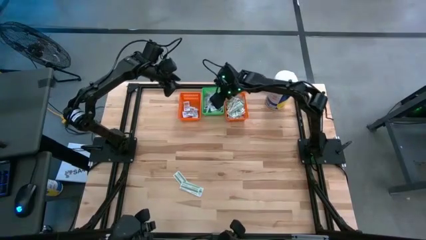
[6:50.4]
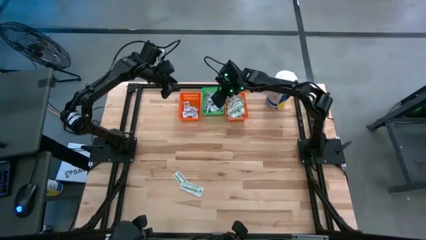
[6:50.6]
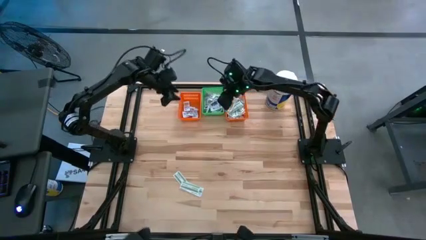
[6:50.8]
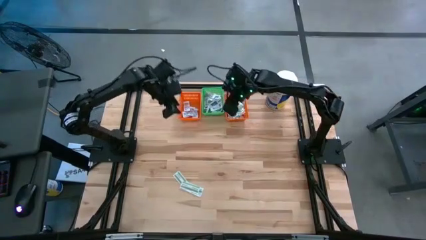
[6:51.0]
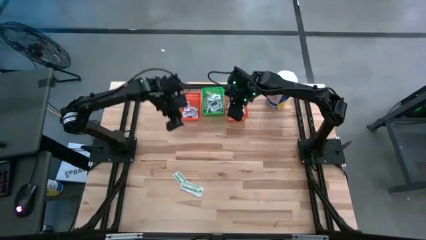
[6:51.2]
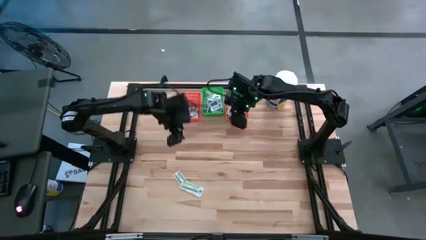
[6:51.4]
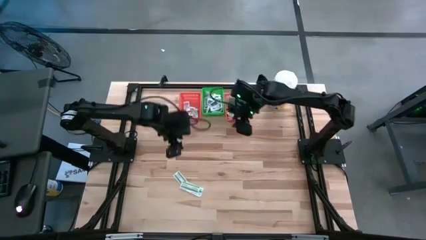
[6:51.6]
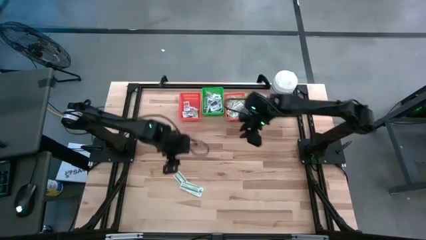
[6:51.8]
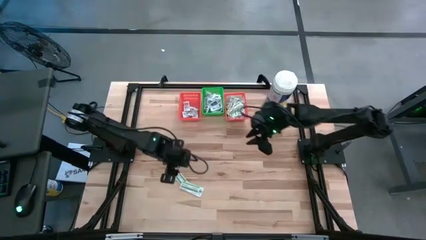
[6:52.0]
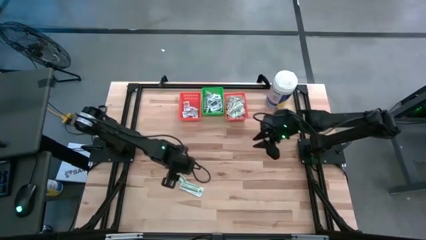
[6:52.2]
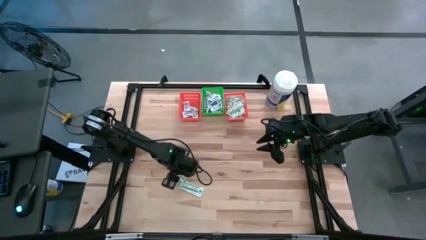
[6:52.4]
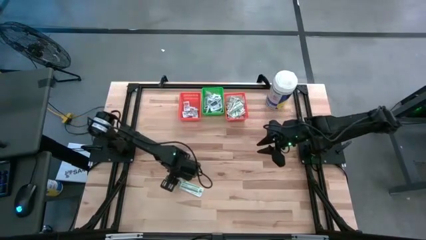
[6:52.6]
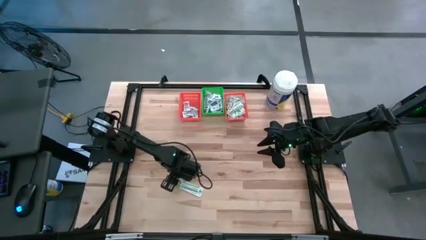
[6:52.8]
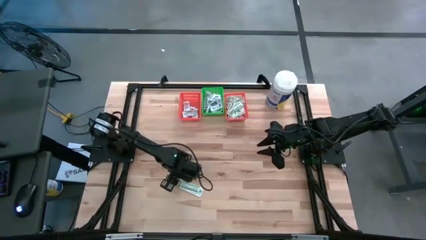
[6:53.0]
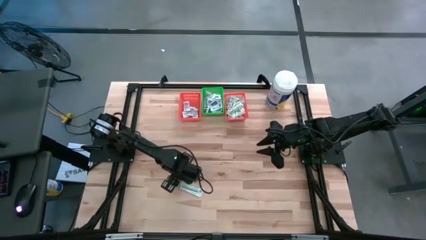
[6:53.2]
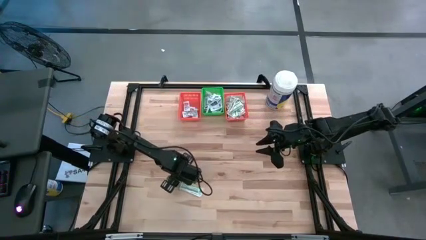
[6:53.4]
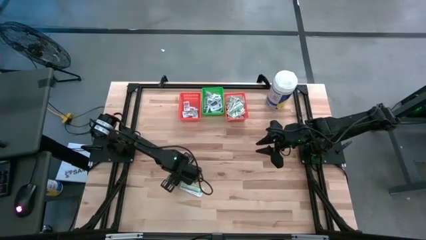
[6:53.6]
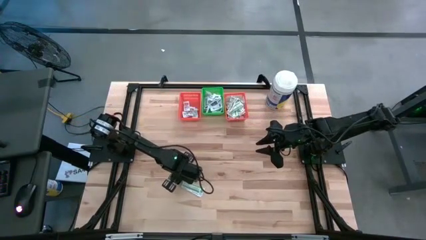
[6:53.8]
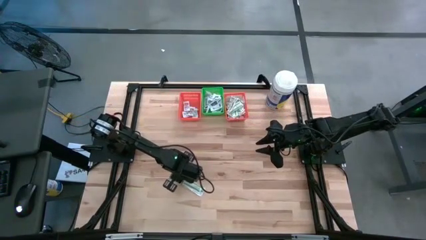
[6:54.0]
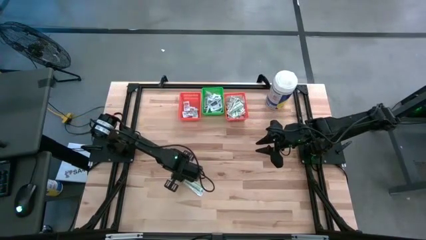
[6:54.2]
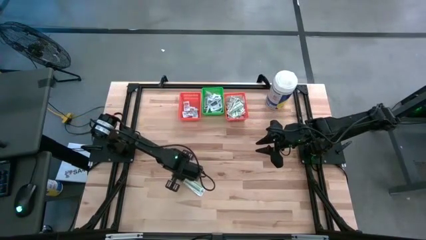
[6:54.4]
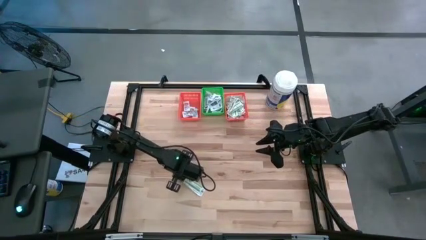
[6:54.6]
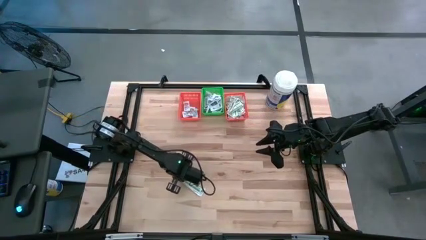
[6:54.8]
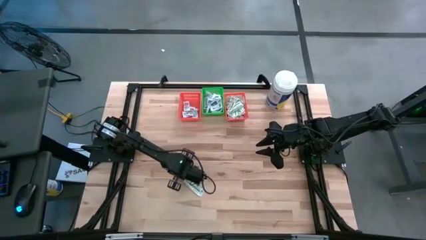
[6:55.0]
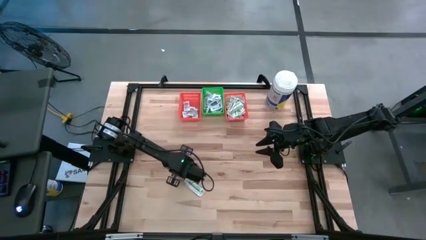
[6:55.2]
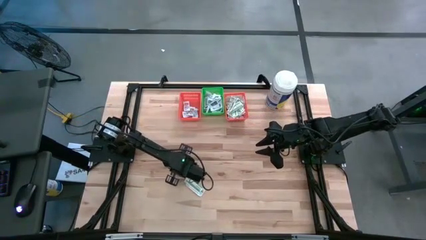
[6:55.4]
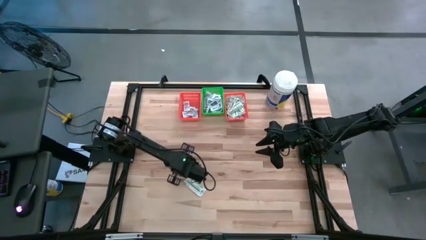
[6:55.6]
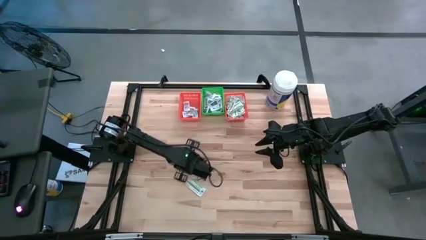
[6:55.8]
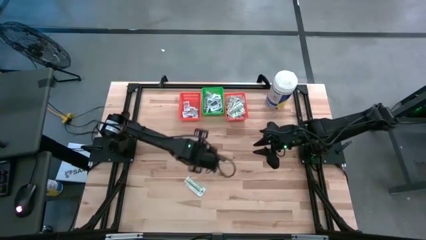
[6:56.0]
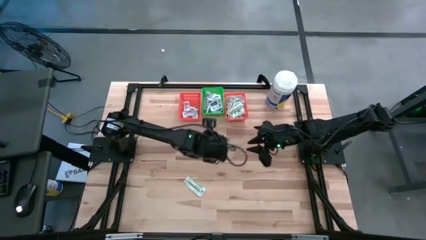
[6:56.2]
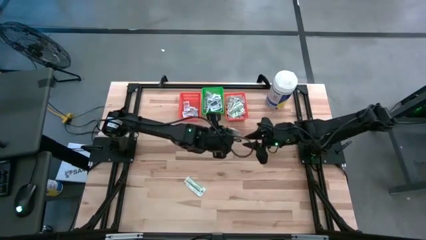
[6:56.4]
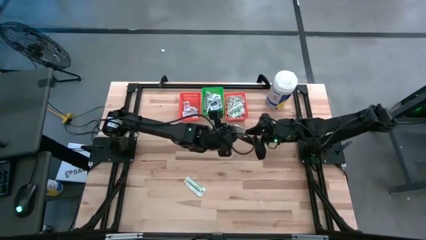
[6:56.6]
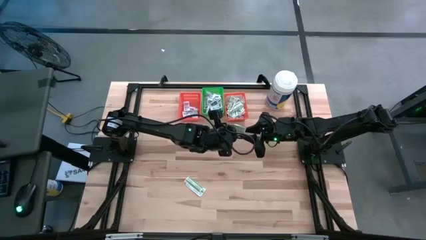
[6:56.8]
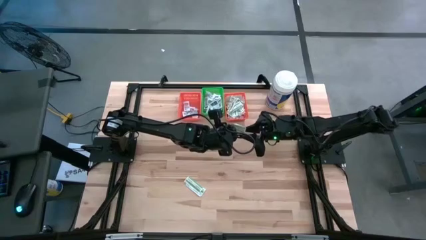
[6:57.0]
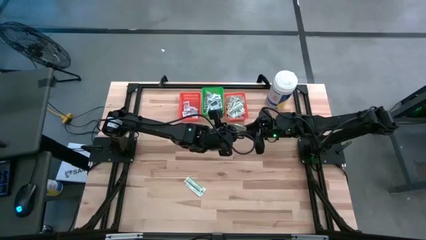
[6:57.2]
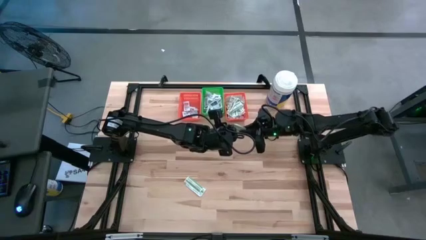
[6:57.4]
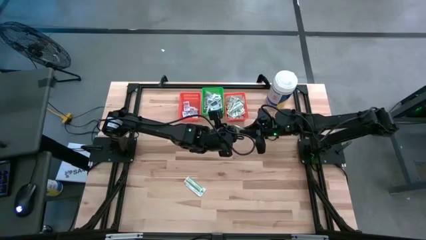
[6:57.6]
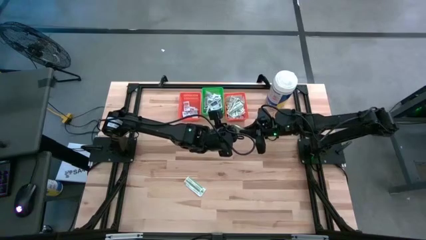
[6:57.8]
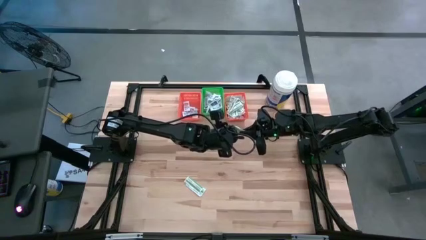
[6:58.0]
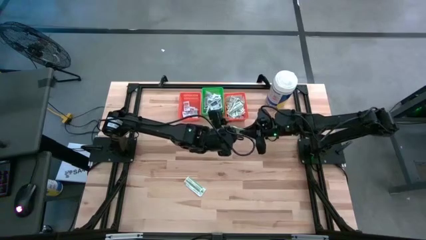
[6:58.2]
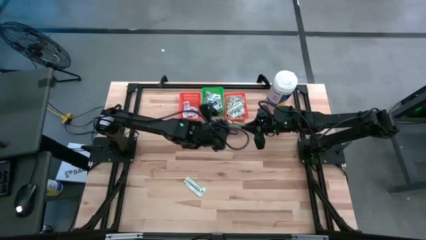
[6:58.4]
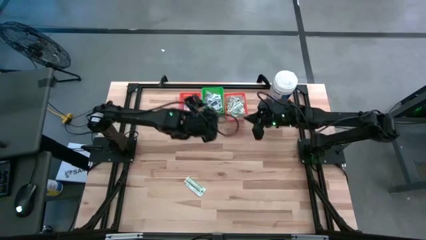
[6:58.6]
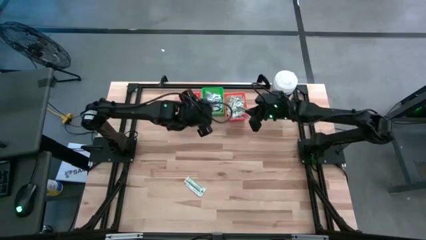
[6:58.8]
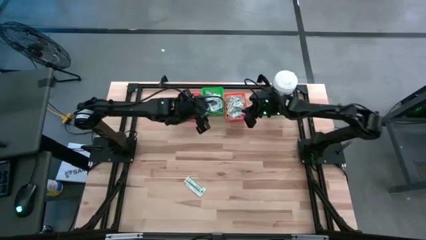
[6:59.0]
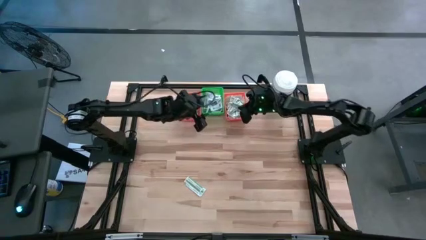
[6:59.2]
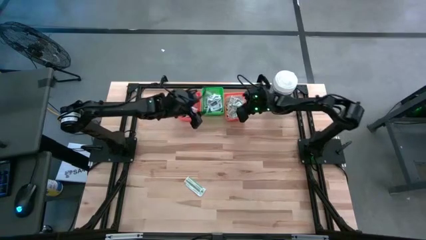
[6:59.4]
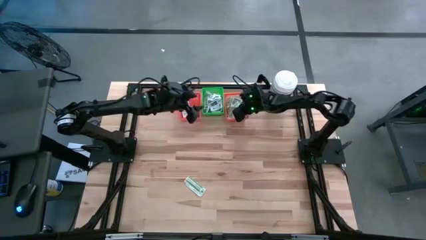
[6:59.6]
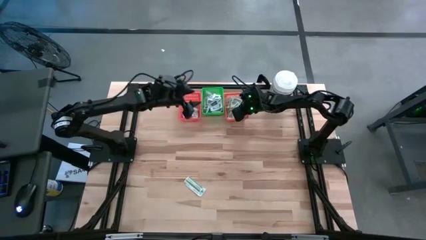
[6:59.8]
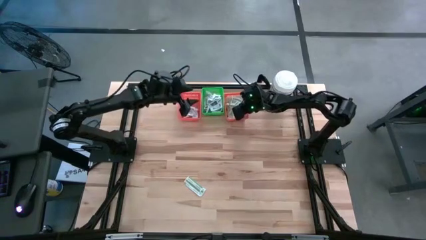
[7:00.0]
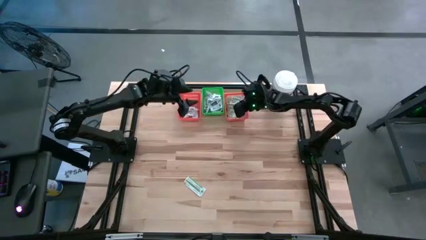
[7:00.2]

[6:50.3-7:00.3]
Task: Pick & Place First Aid Supplies
Put the bandage pack into the right orange bin

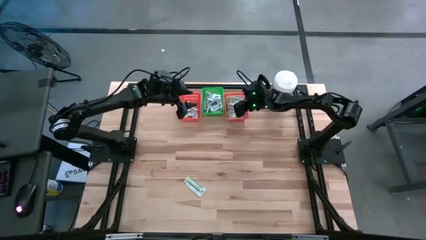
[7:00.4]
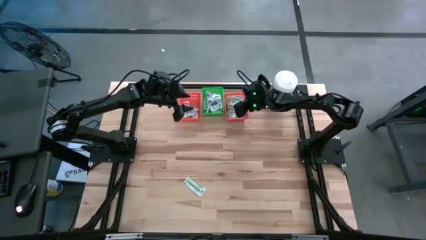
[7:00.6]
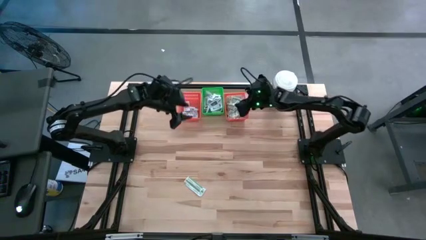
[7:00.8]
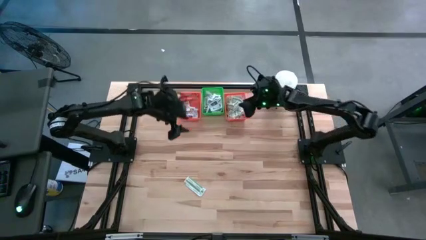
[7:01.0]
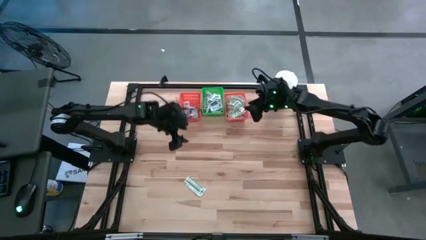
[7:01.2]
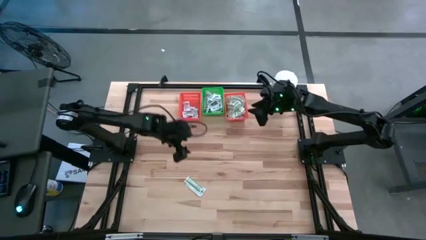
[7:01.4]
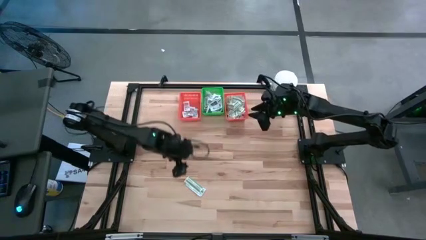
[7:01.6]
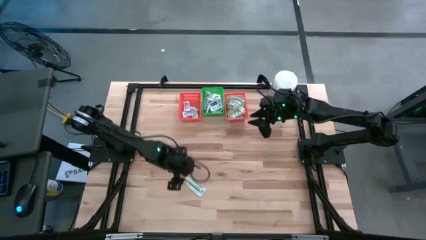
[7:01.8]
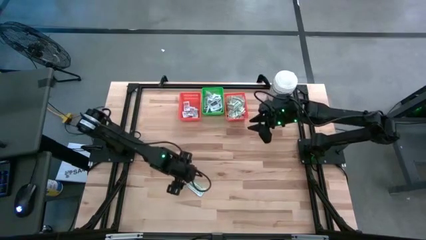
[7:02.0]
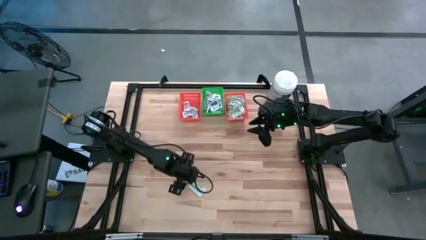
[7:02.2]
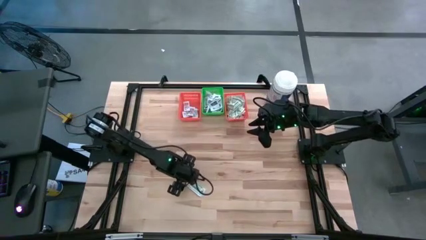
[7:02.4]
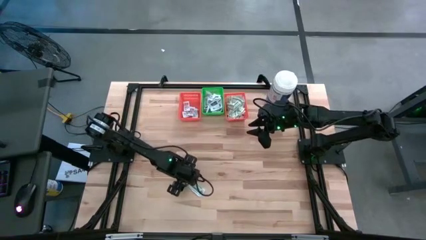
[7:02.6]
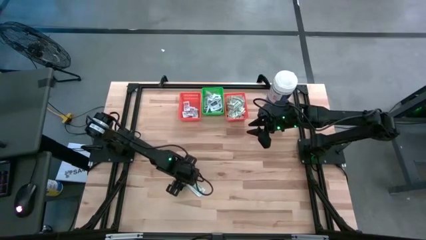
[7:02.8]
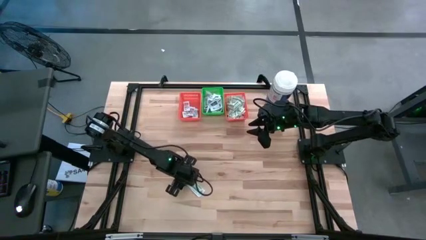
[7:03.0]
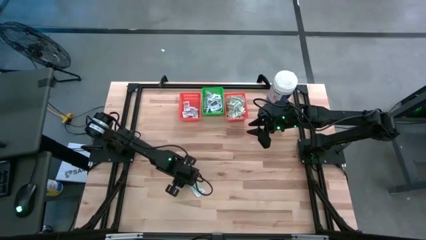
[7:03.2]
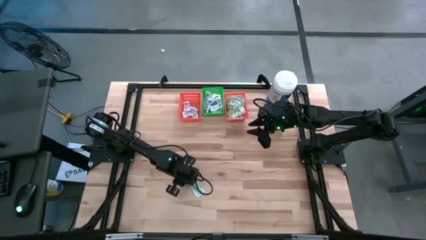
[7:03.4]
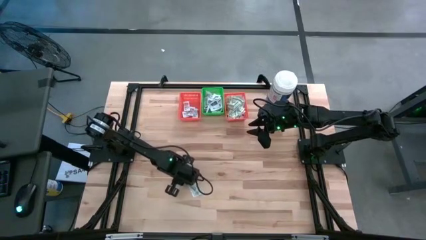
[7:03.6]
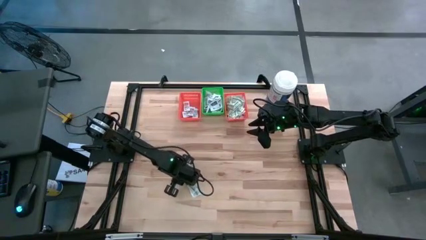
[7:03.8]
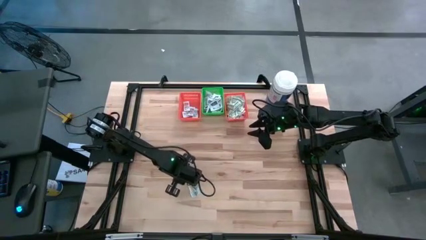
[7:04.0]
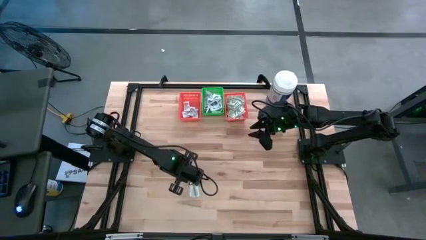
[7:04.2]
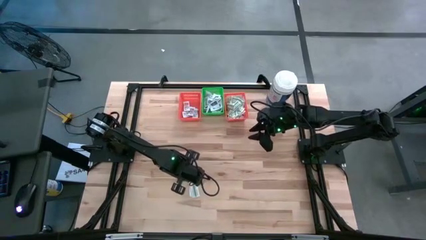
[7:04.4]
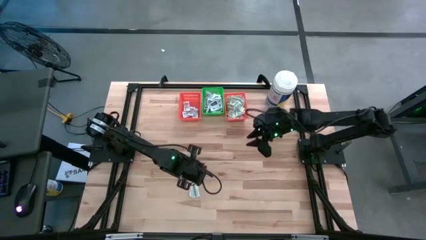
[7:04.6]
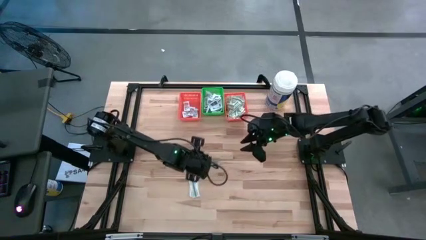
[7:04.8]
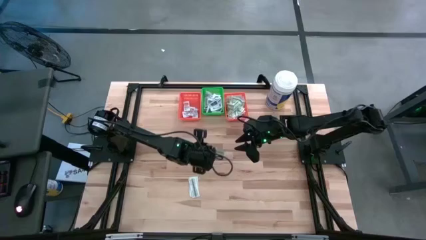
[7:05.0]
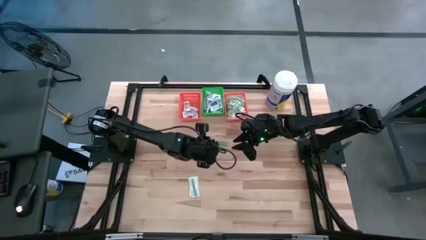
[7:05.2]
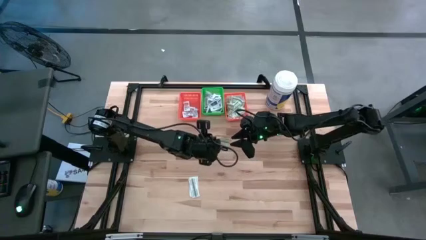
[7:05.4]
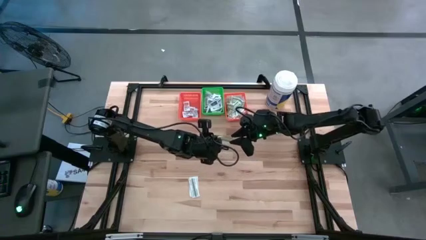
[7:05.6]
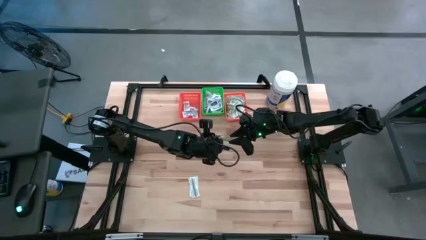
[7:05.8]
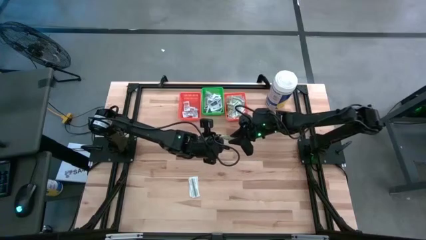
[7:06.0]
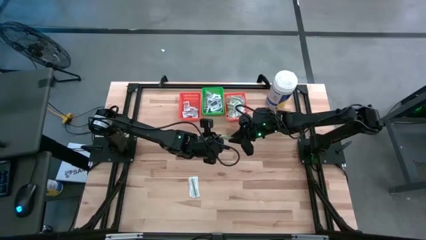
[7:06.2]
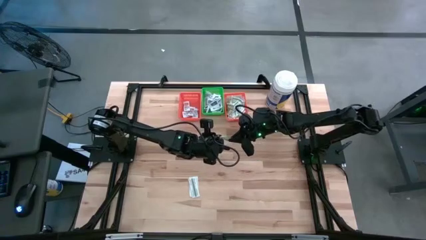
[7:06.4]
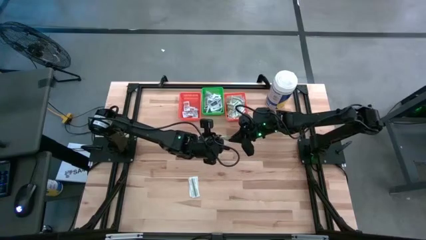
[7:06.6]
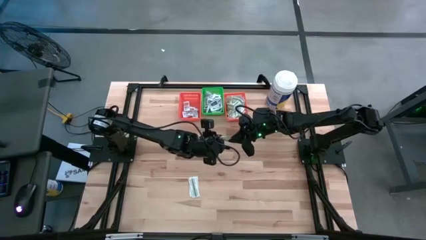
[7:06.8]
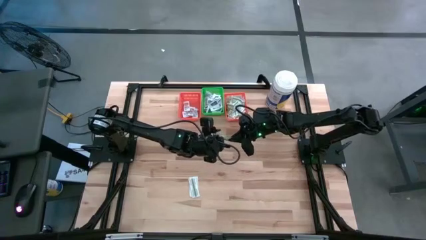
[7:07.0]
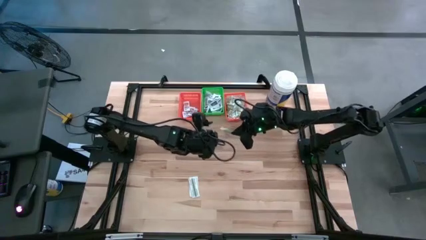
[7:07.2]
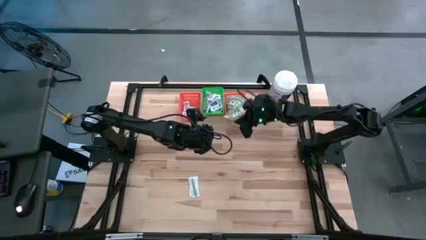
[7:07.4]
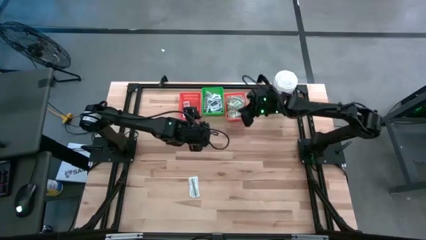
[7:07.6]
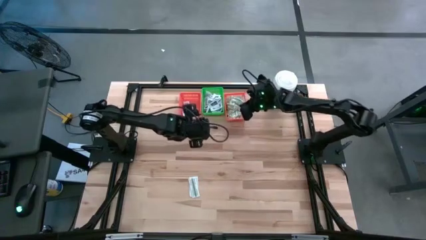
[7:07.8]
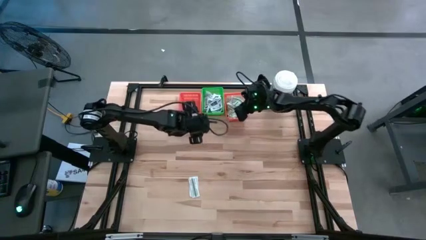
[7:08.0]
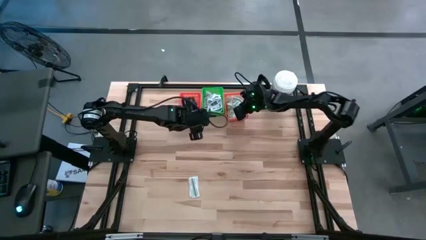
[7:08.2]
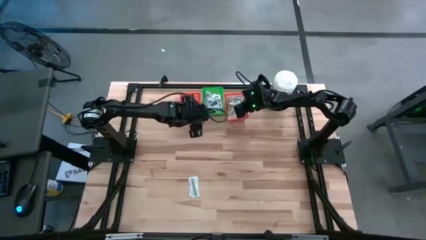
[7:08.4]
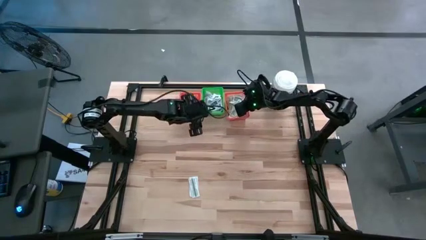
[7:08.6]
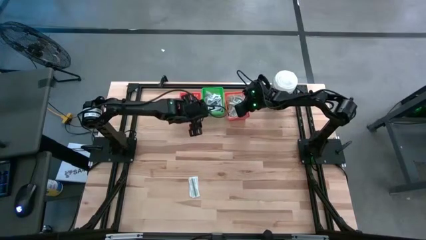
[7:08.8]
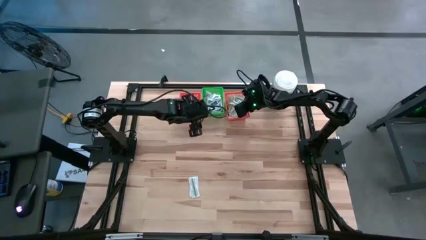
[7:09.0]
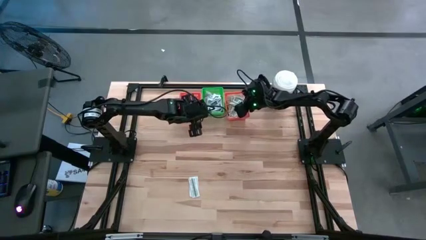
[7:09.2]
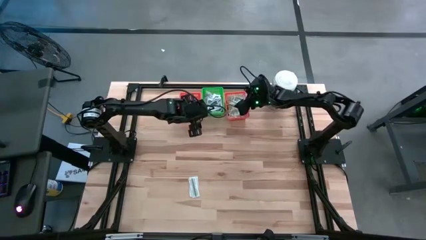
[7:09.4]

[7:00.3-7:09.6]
Put the top bandage pack into the right orange bin
